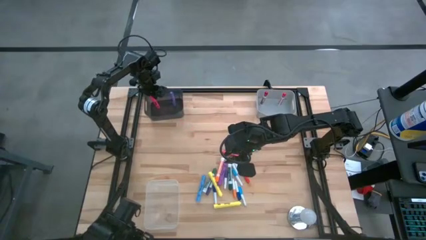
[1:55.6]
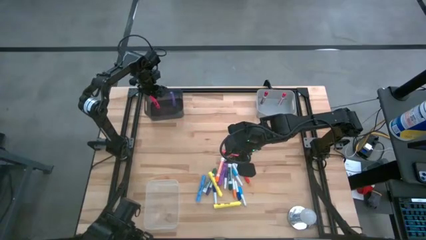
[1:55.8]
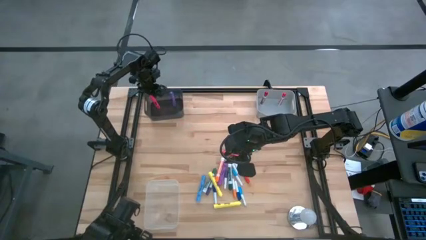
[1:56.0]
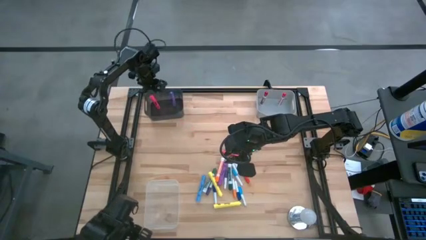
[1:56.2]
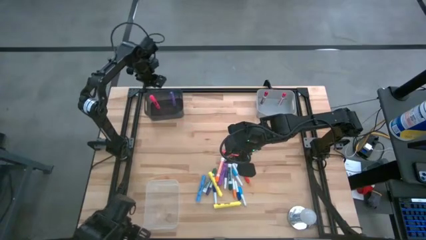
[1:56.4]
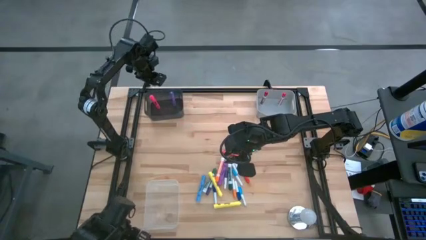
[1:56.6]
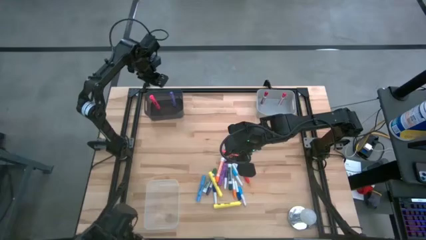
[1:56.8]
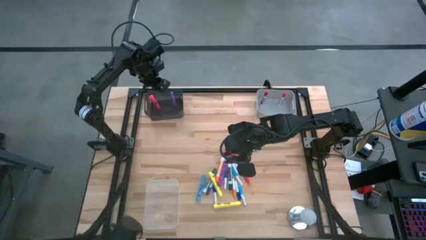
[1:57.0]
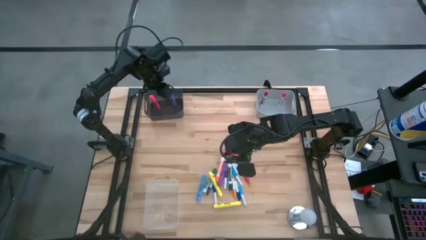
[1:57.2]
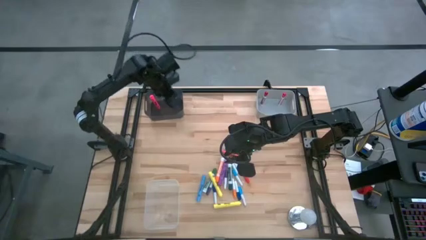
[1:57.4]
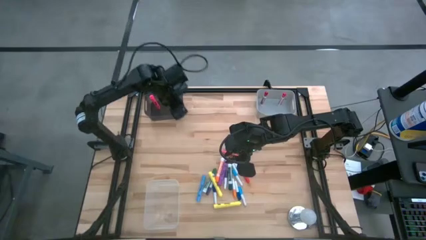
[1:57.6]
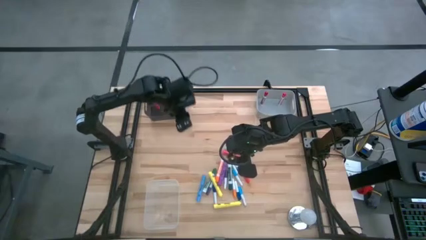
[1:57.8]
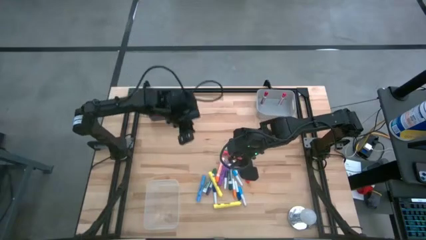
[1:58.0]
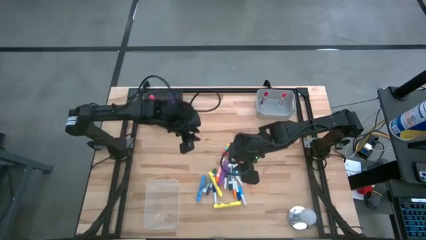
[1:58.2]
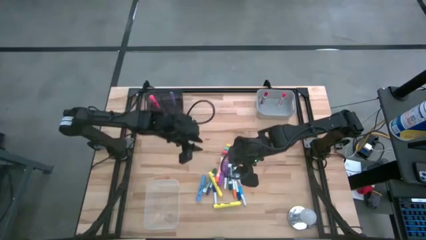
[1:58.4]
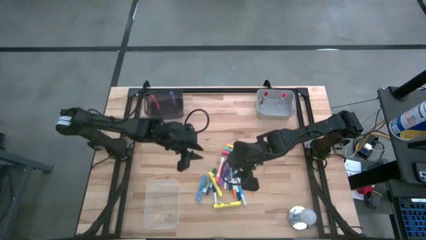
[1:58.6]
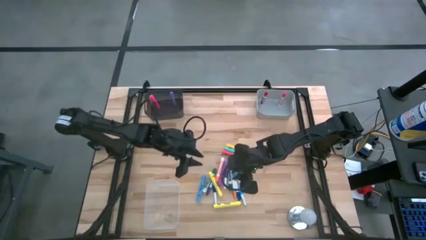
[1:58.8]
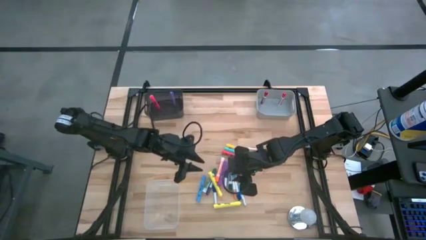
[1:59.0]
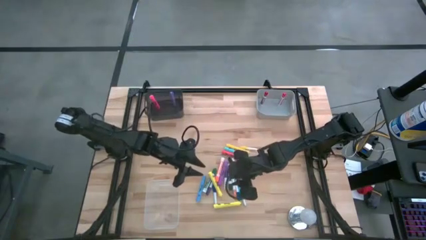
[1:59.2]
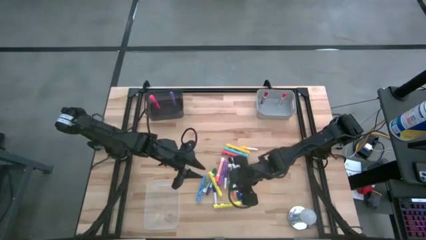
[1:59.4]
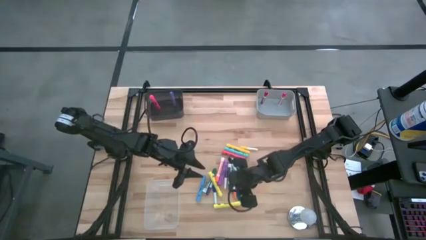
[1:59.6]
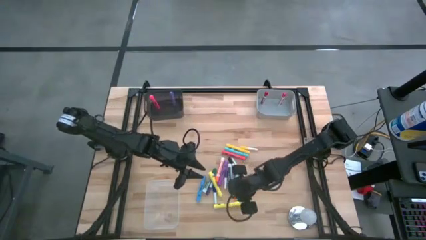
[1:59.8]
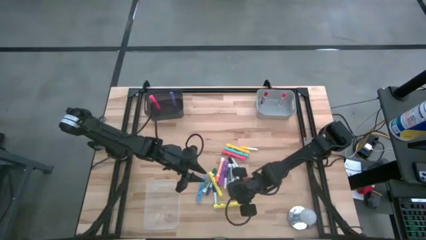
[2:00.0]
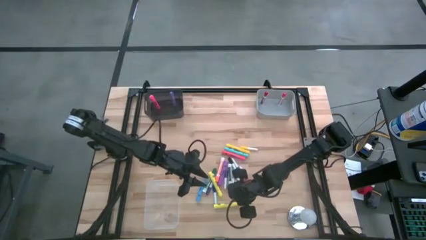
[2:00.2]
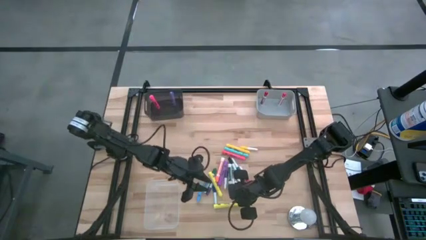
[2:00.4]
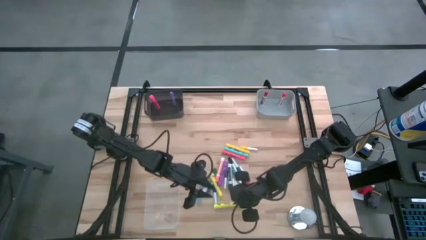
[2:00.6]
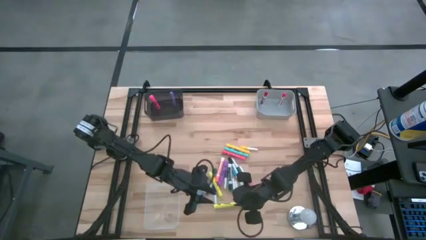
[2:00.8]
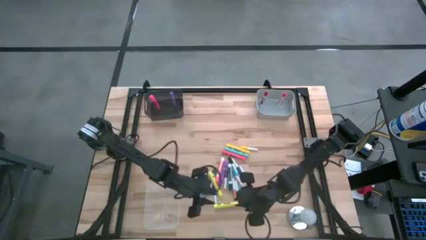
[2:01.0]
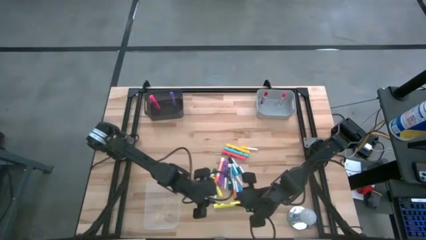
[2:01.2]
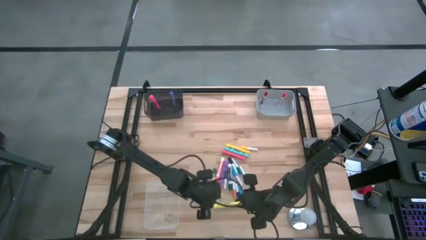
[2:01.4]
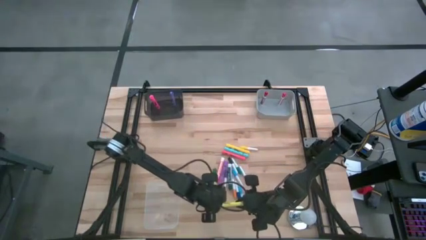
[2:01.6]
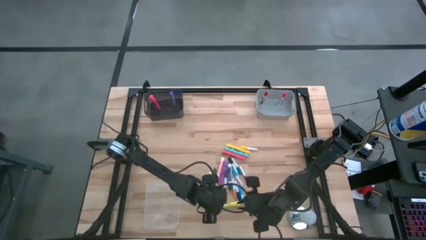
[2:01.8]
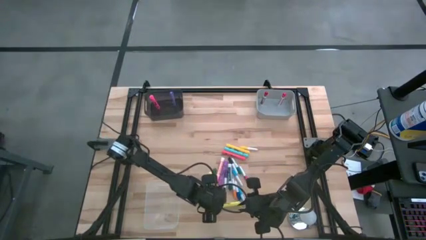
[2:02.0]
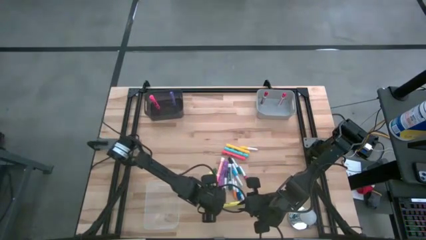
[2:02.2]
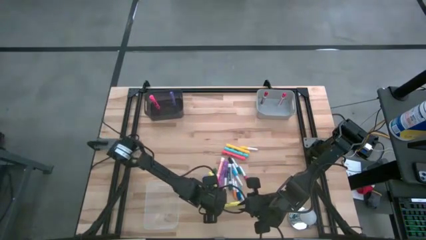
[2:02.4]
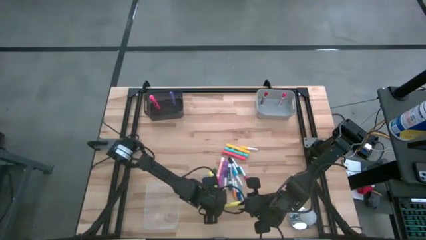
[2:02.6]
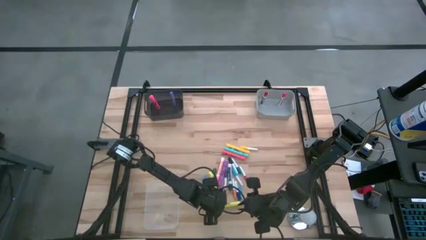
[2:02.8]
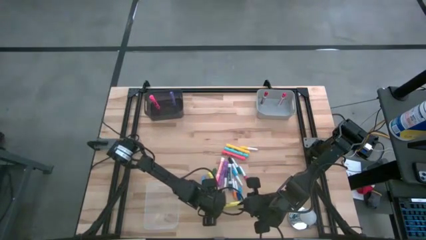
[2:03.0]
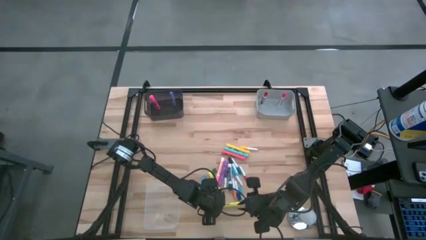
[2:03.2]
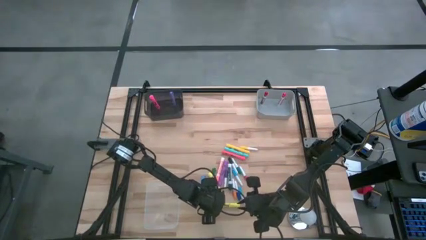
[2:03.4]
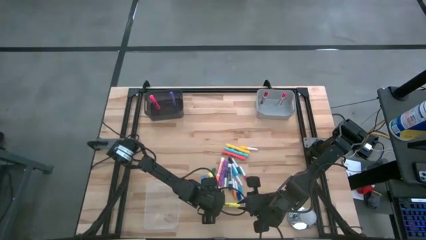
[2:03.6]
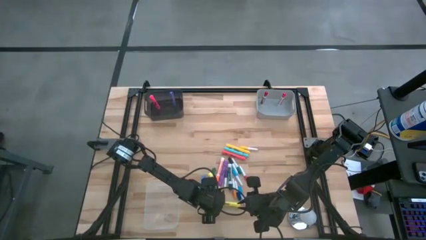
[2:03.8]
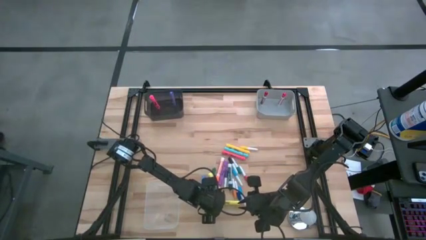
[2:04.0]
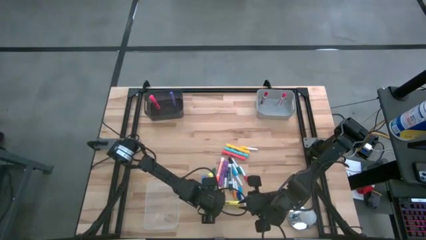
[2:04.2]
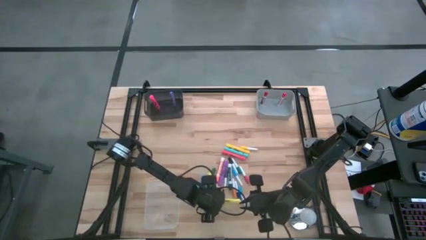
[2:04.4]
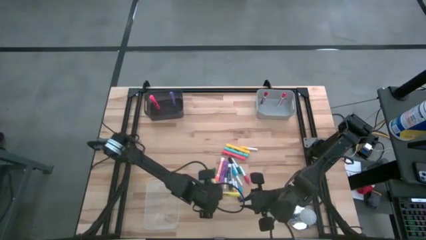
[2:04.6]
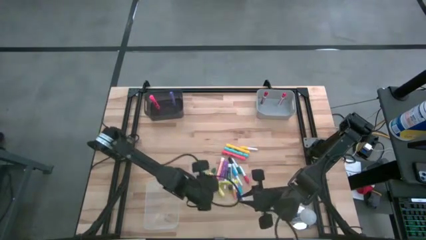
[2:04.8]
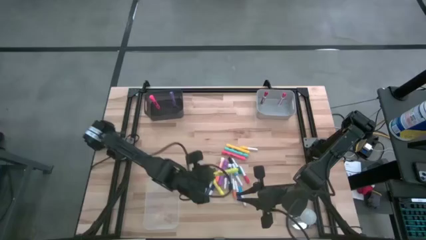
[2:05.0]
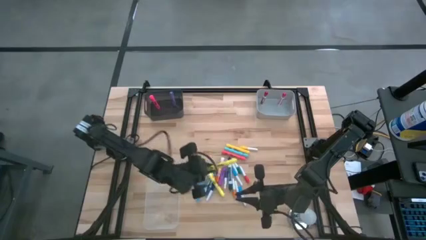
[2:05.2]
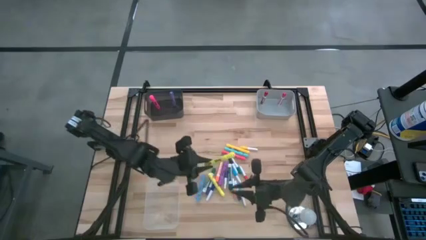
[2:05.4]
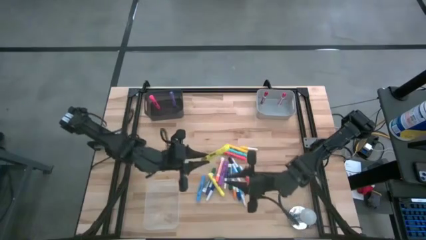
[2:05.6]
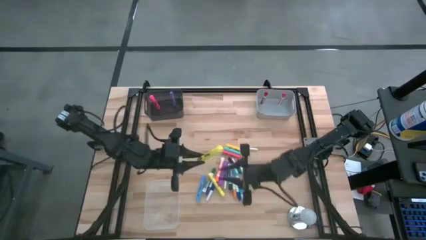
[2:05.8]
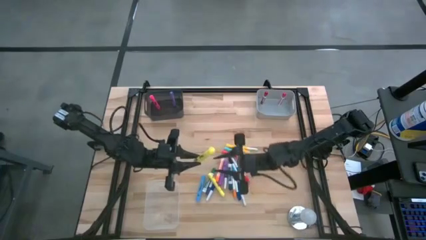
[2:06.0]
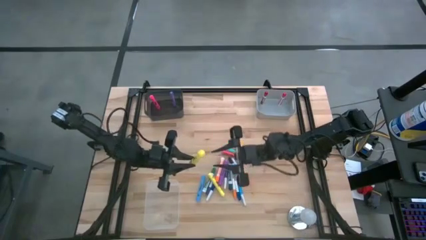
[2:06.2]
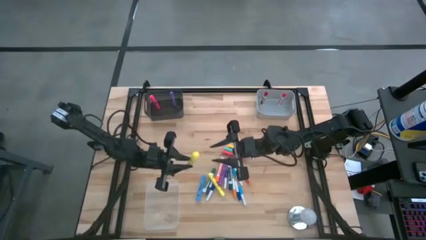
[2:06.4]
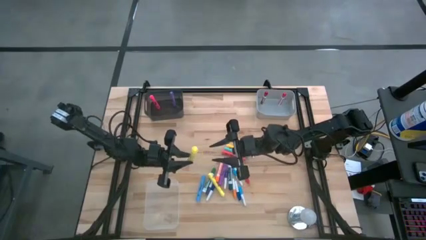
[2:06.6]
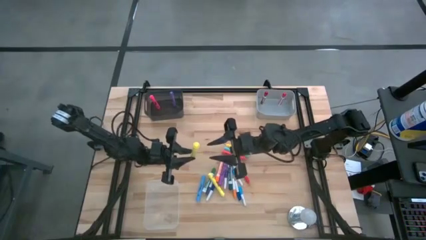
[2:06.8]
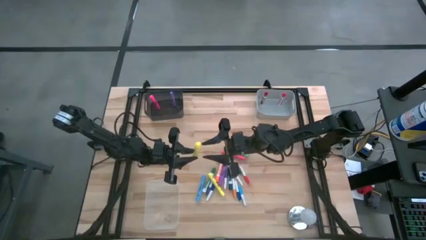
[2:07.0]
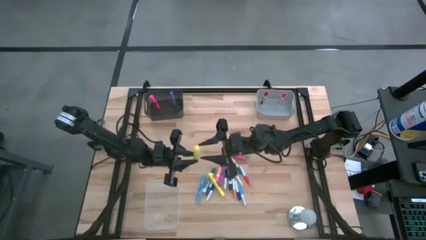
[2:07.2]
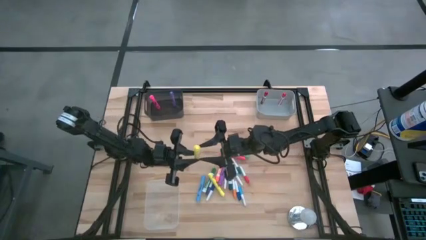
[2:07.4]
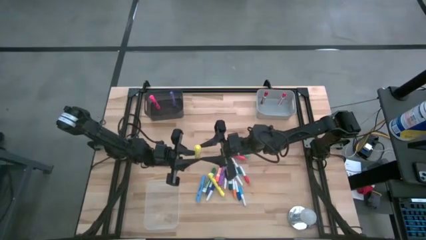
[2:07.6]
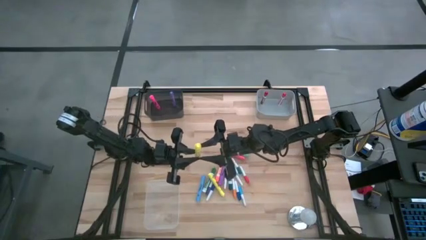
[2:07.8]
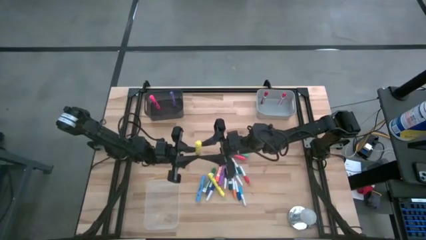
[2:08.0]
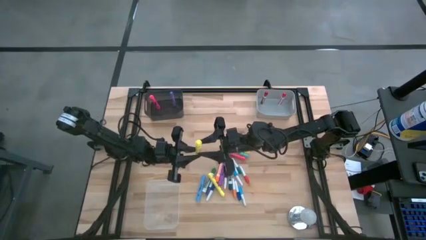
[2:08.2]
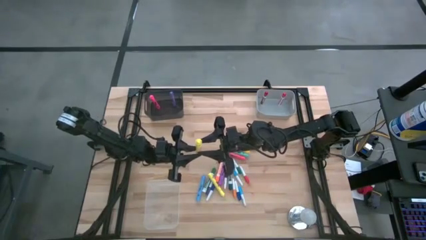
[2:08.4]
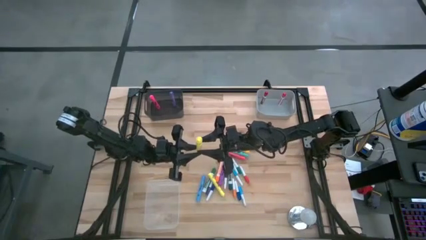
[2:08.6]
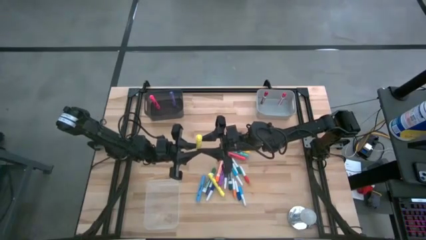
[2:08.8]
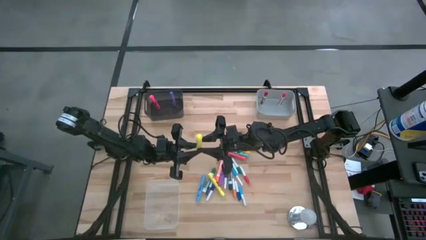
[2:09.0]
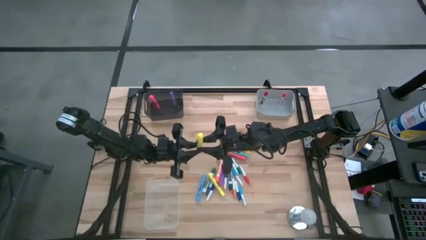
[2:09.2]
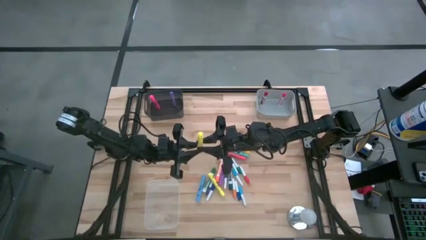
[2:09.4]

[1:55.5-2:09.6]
Task: Pick & Place Markers
Put the yellow highlighter pen into the black bin

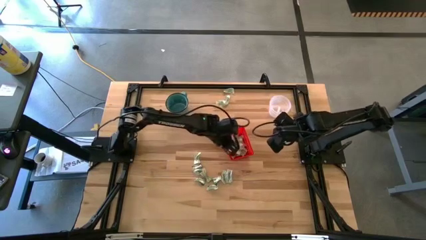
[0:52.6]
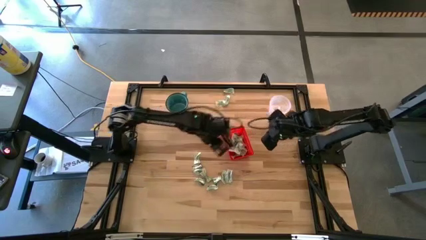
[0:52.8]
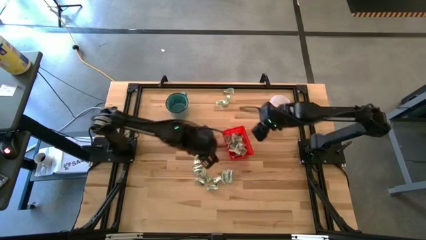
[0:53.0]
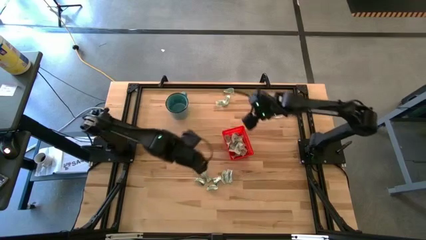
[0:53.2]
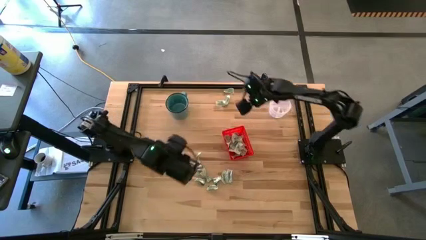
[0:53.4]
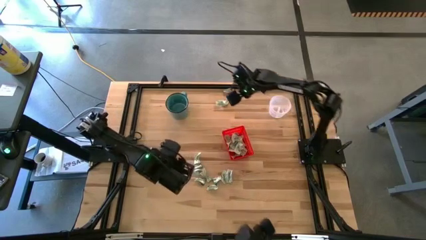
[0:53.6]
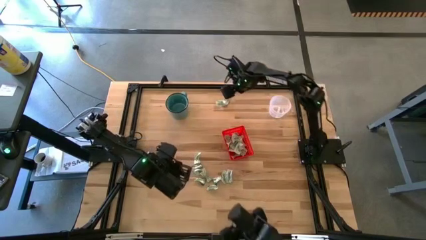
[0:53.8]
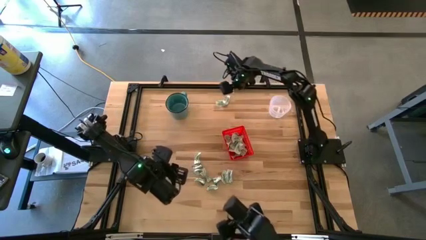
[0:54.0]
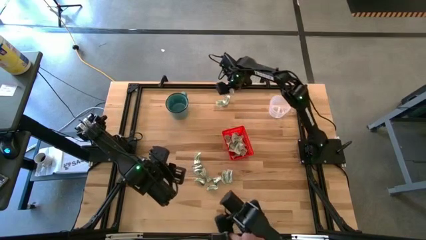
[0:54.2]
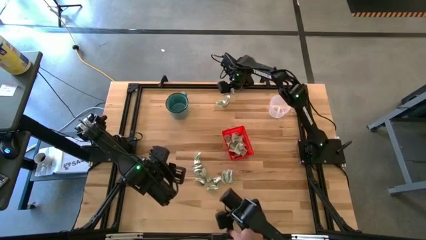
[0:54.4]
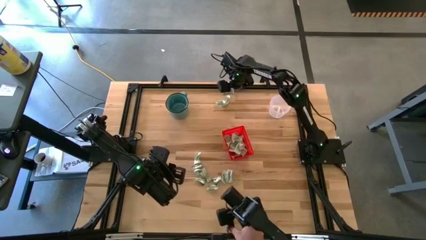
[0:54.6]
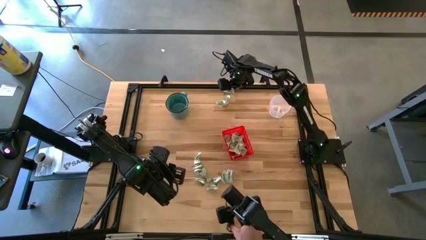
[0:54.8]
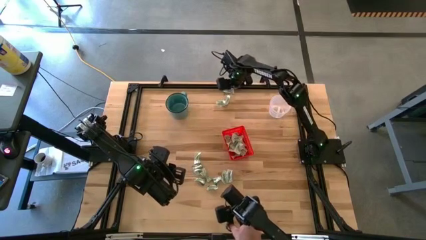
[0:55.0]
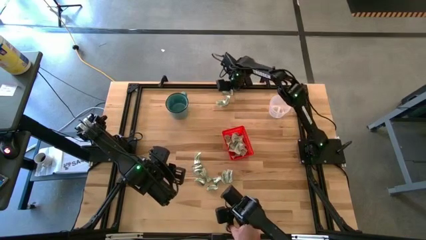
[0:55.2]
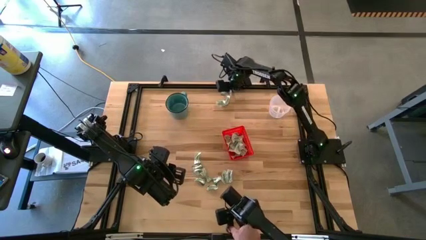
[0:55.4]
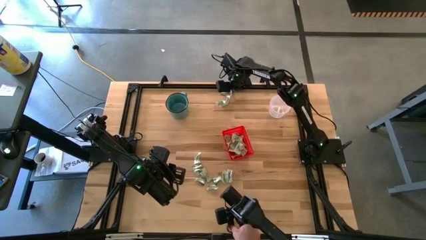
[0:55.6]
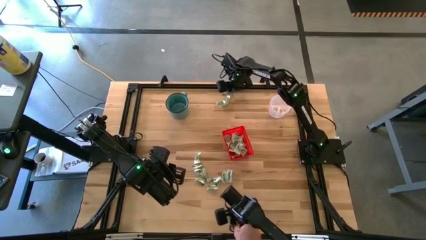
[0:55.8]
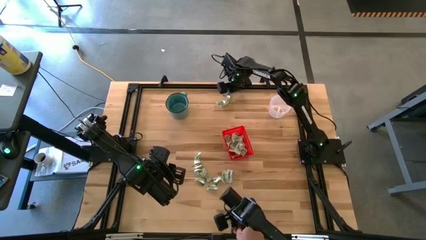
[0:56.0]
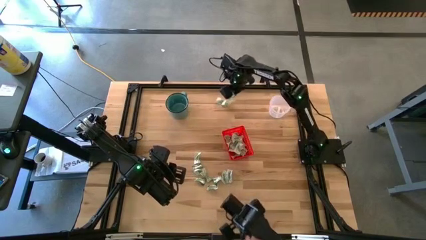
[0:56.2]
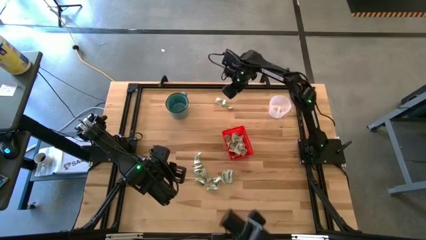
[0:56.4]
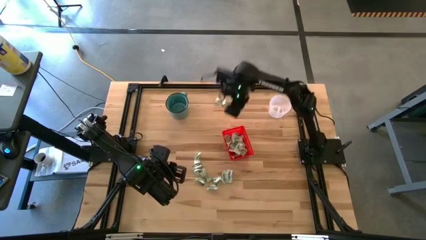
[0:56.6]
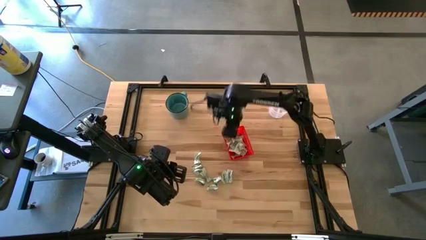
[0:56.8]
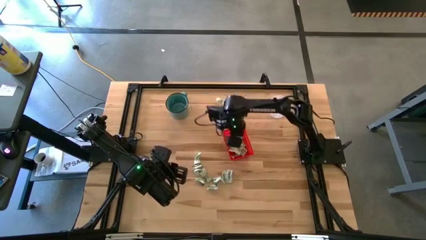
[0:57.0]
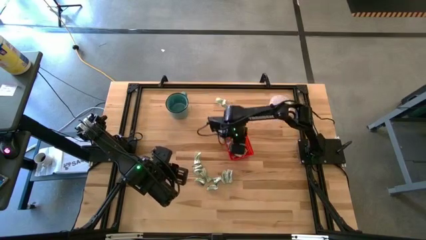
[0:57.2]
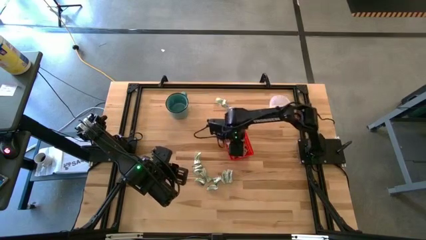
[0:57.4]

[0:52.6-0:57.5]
Task: Pick and place items into bin
Put the stevia packet into the orange bin
